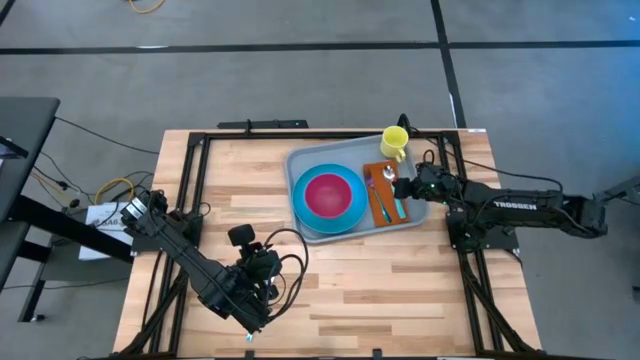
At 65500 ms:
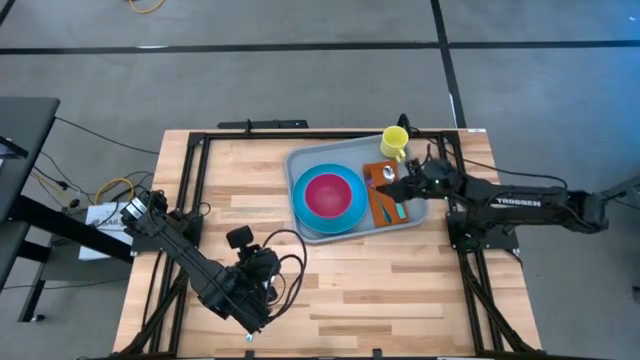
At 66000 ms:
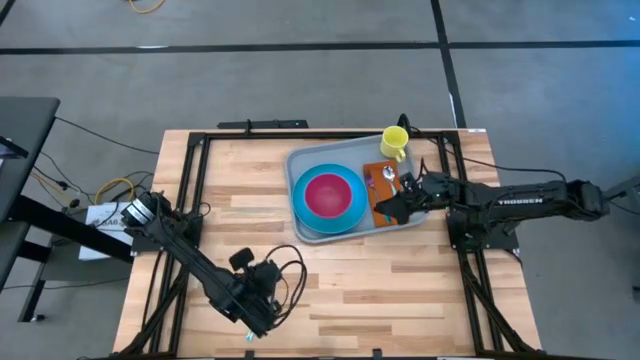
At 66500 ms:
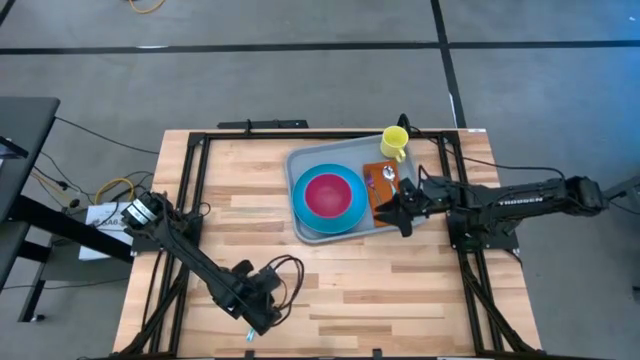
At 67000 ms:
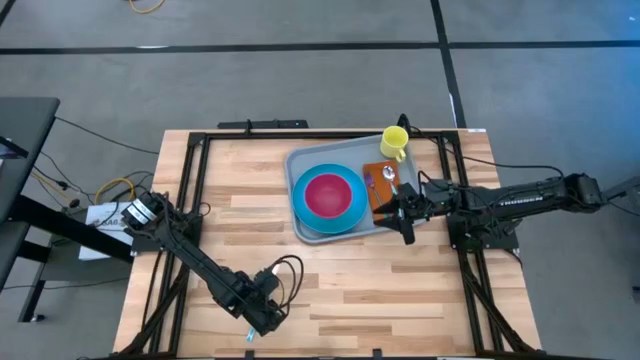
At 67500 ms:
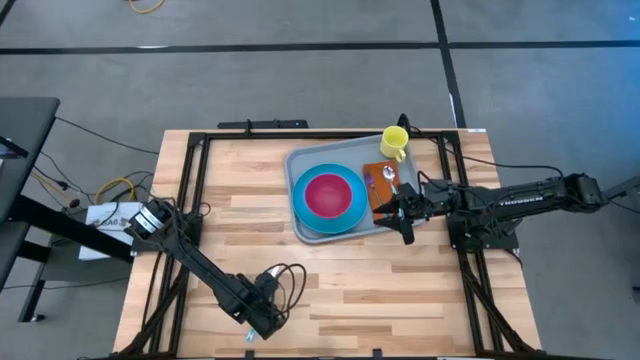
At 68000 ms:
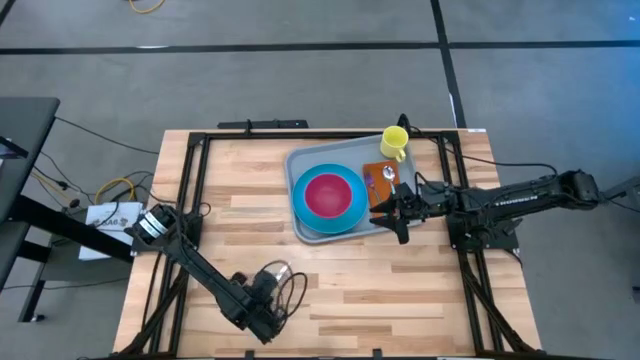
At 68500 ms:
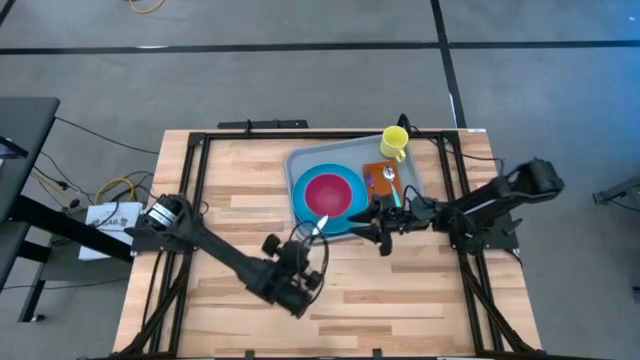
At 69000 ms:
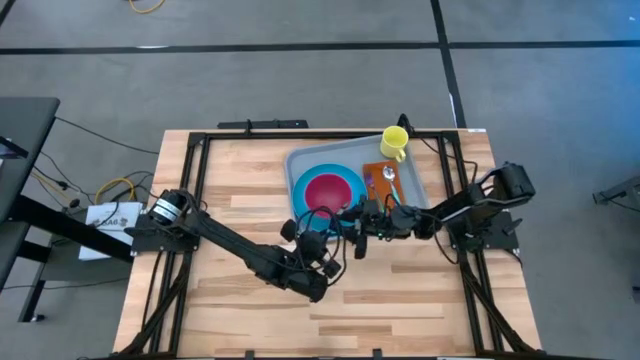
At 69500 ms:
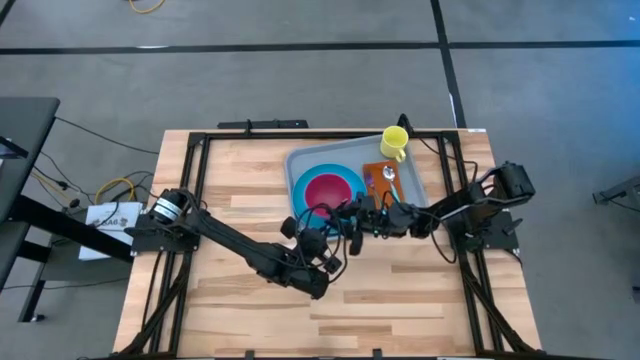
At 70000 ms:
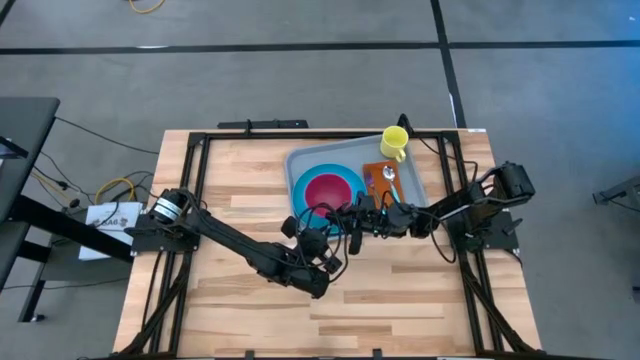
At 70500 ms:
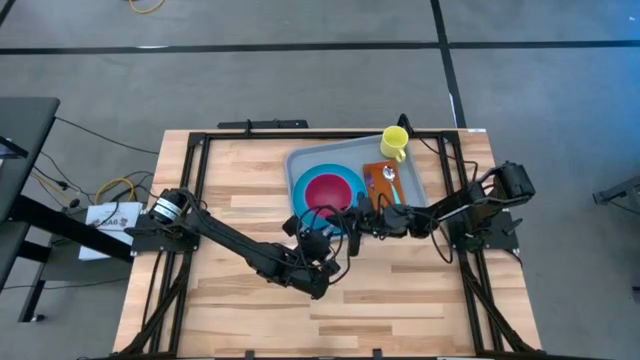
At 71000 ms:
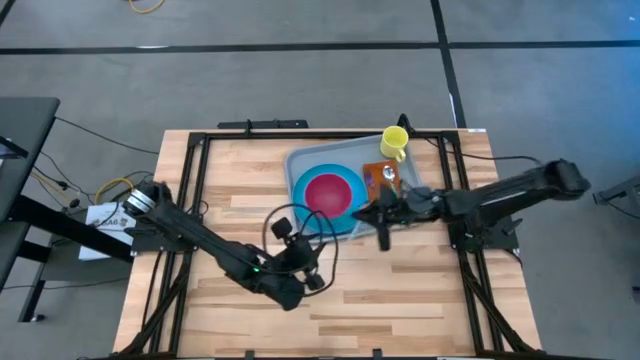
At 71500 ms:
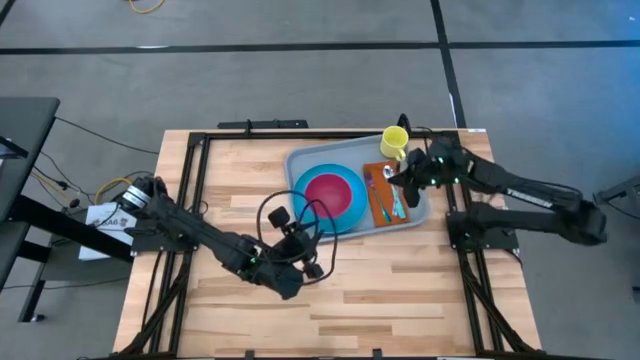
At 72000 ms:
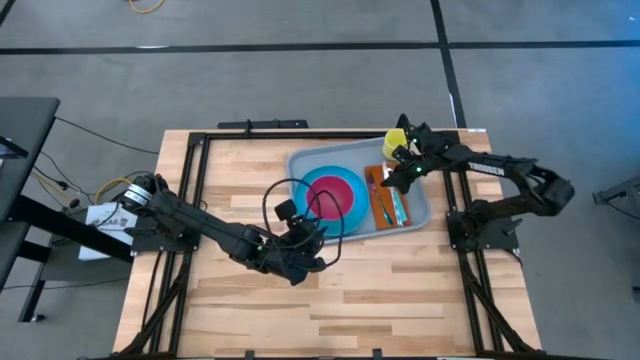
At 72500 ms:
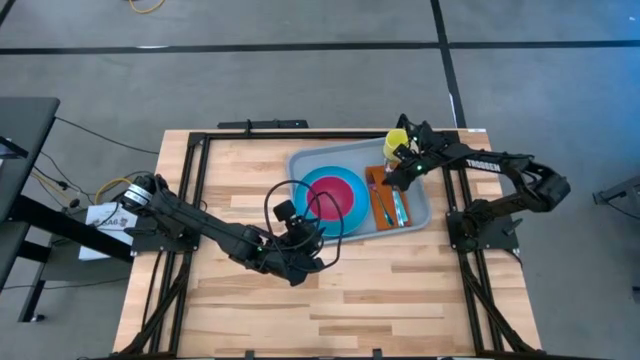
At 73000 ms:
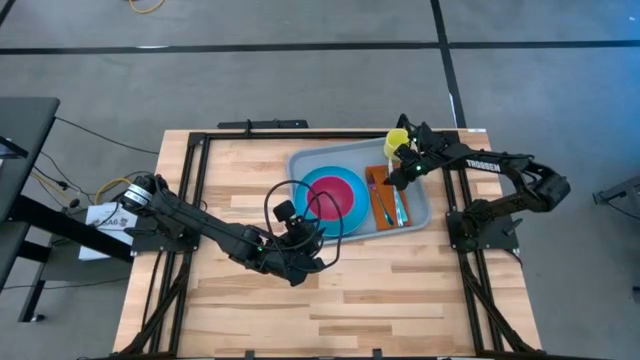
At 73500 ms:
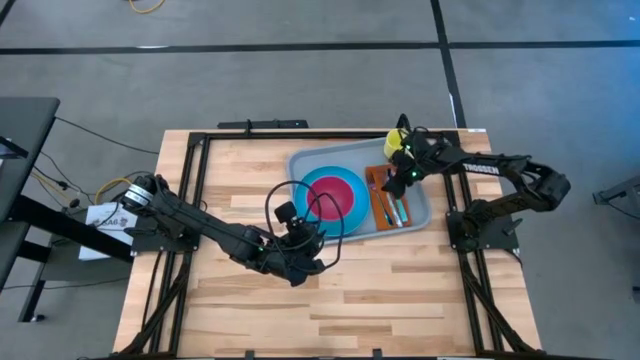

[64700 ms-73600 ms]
Task: Set up tray
Put the blue white knife on top of the orange napkin to the middle of the green spoon and purple fork

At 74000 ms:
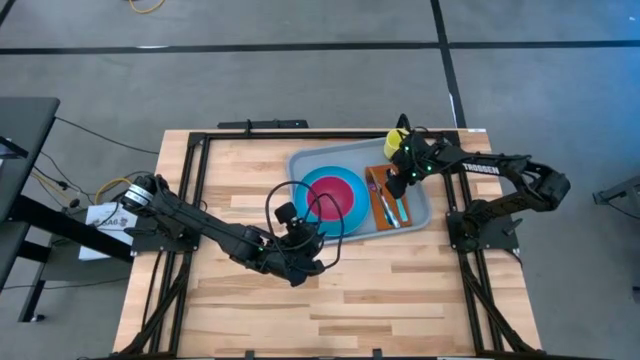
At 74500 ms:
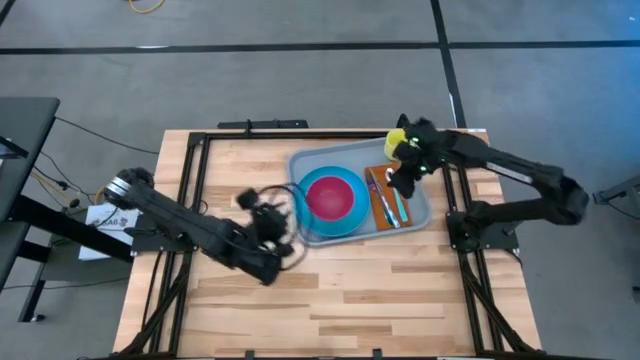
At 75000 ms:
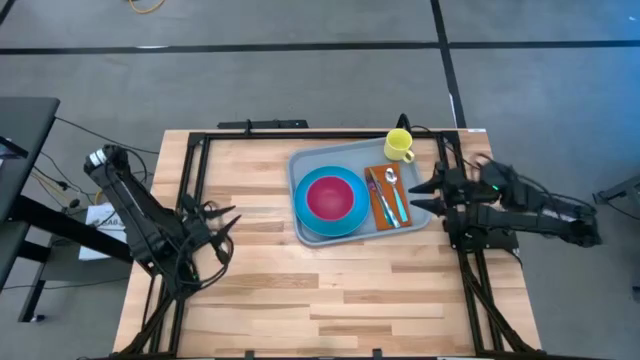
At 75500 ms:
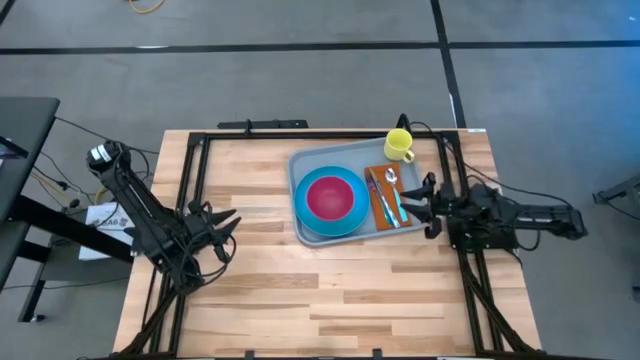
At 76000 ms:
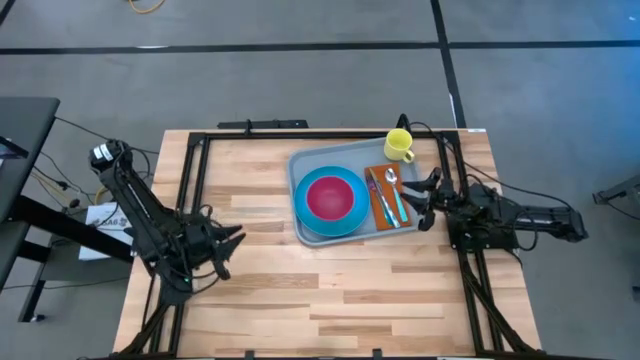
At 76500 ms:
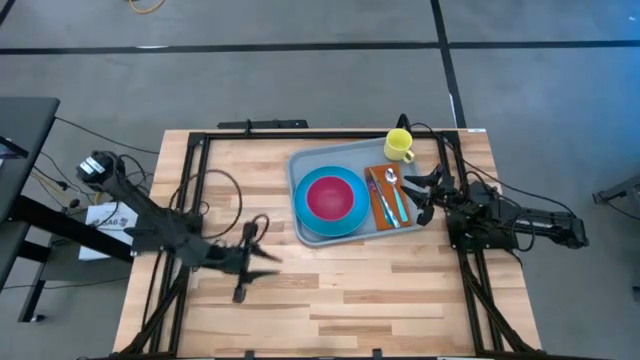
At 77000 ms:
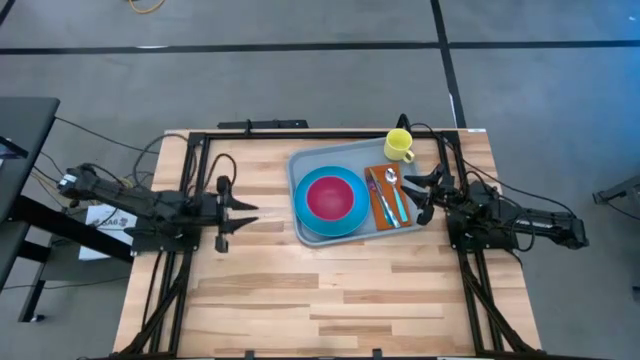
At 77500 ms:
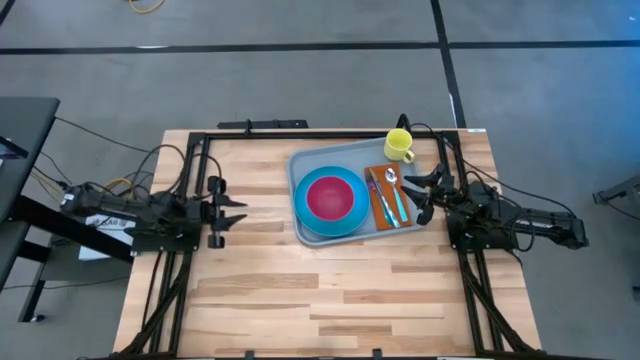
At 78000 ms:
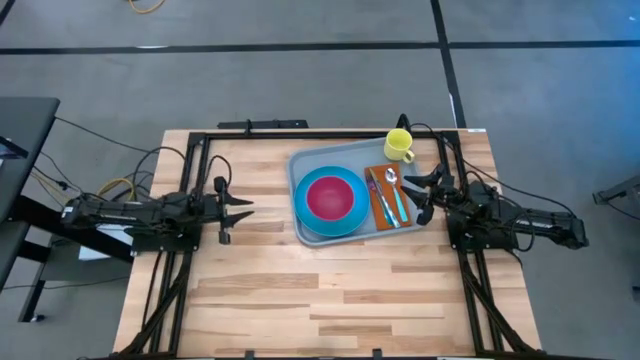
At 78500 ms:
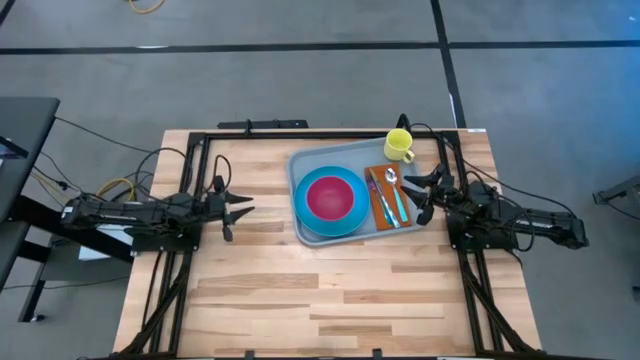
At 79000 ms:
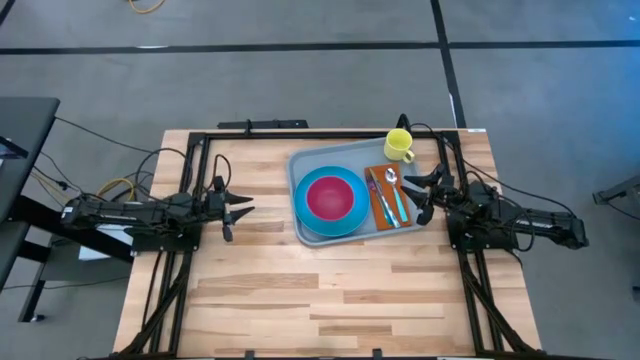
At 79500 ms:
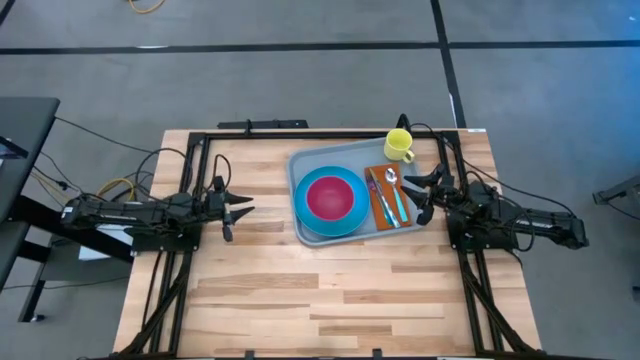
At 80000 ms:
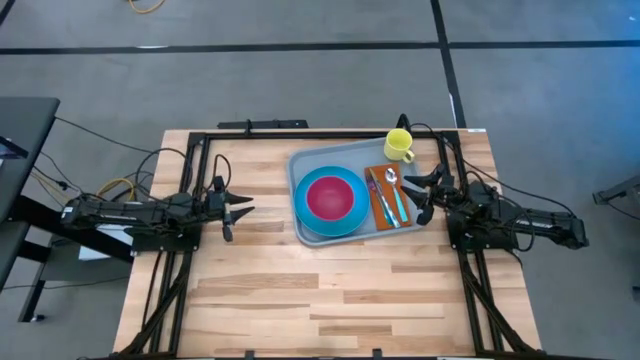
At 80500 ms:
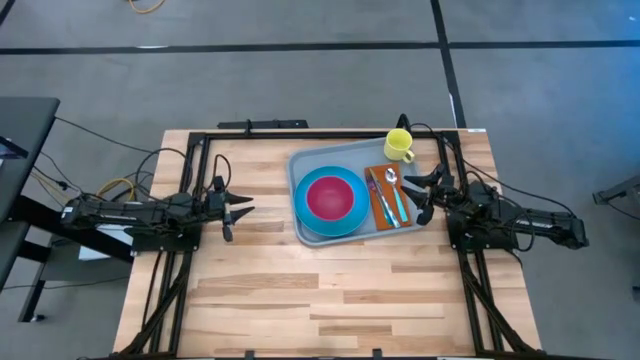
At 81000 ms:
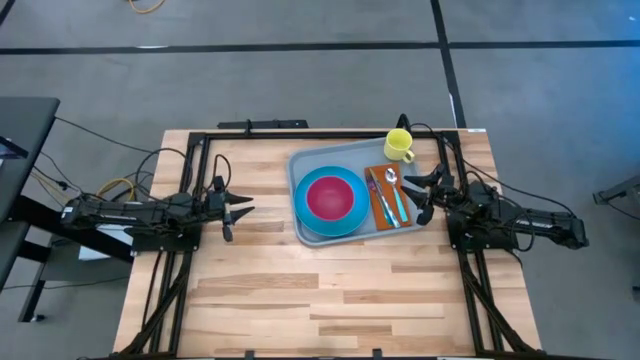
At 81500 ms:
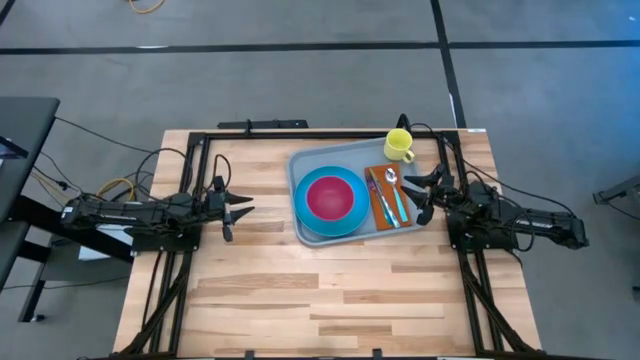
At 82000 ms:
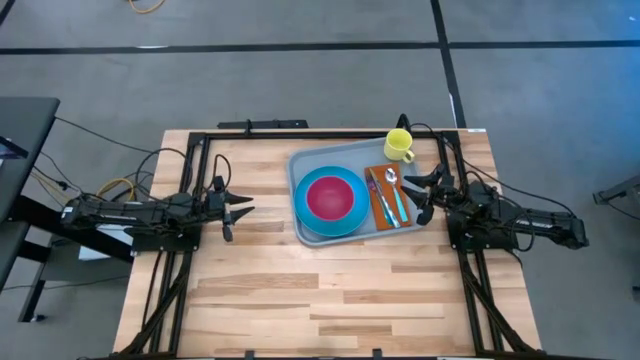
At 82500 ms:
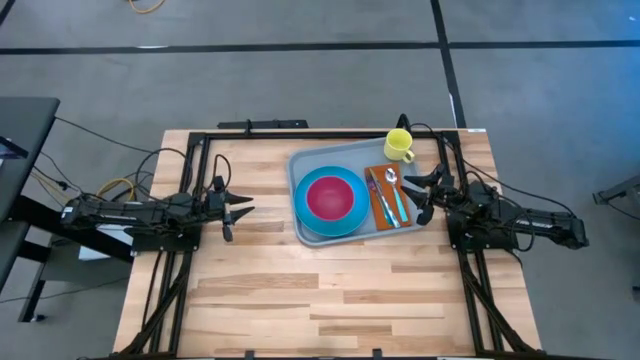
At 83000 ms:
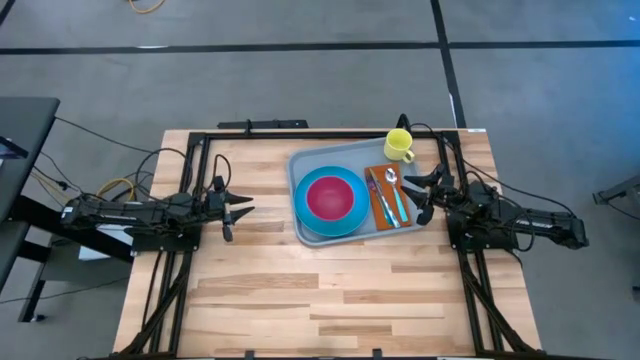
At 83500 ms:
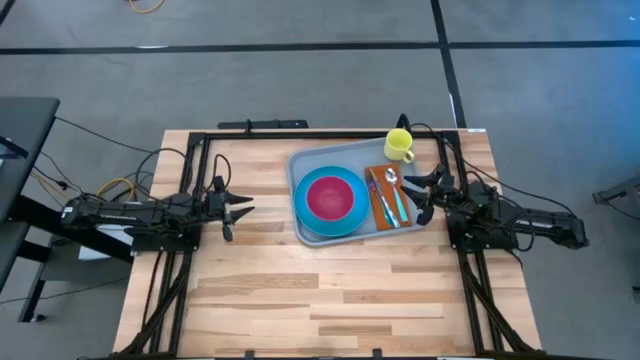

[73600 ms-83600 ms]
Return to Home Position

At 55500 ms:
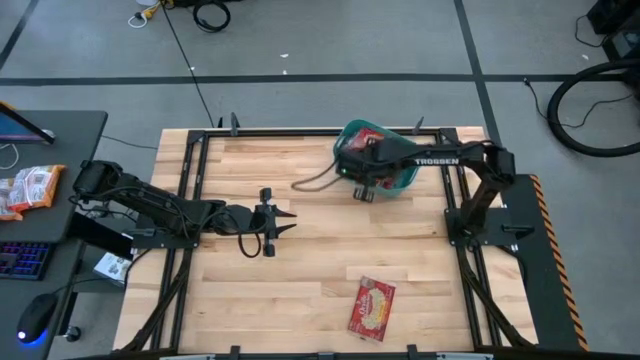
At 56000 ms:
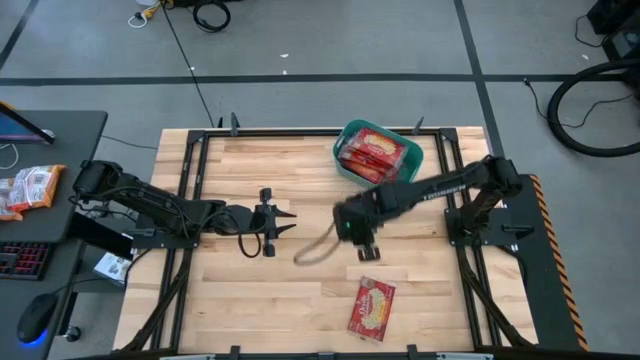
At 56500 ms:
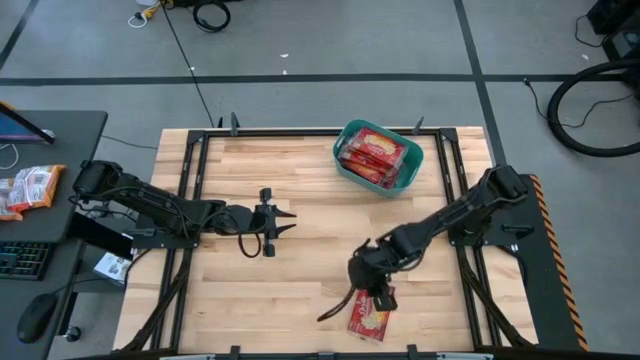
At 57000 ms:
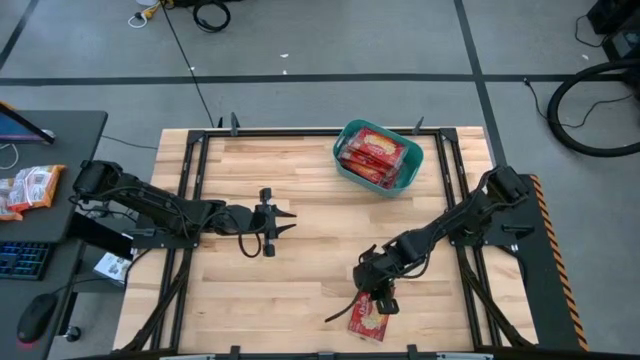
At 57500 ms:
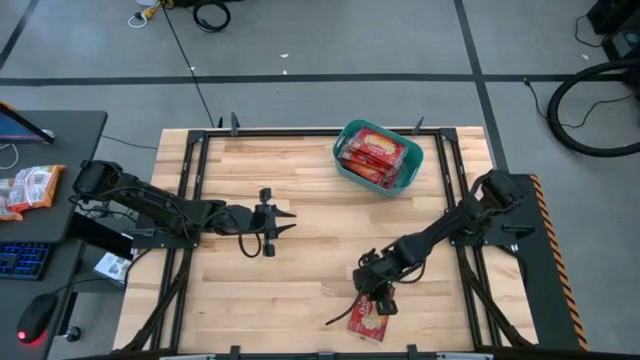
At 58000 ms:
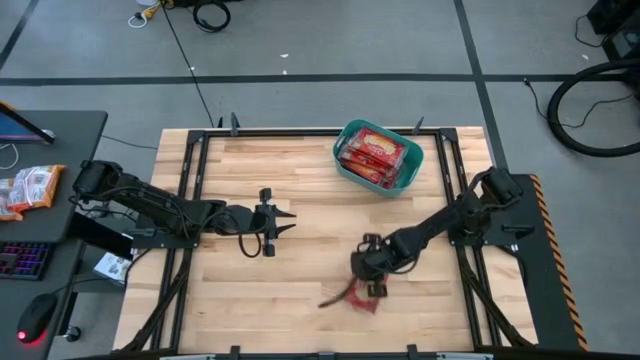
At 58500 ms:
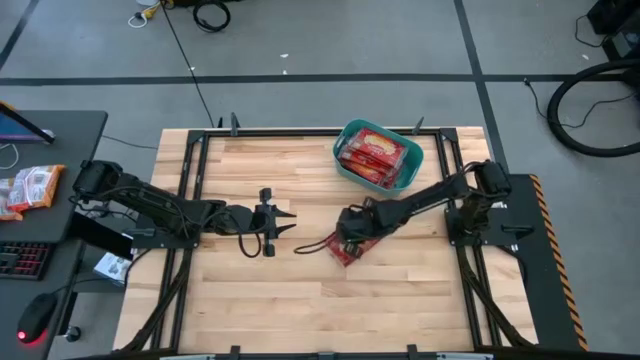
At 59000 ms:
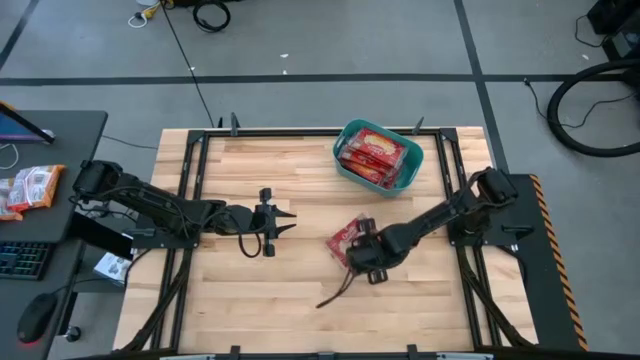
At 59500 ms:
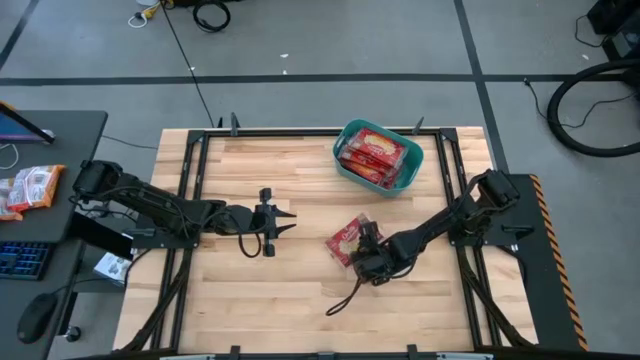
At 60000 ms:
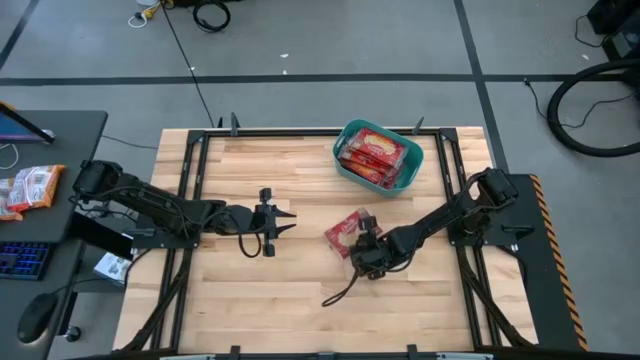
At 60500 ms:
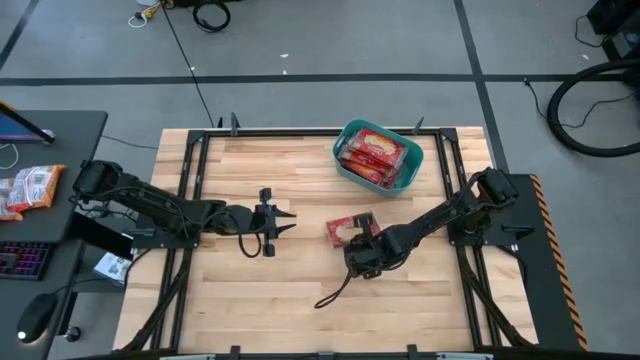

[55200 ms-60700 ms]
Task: Sort popcorn bags into baskets
Put the popcorn bag into the bin
